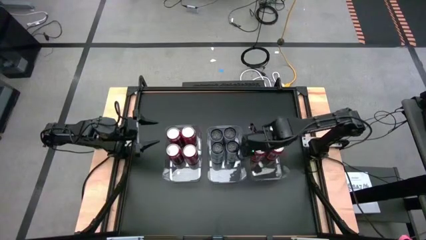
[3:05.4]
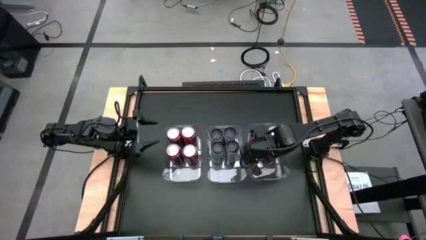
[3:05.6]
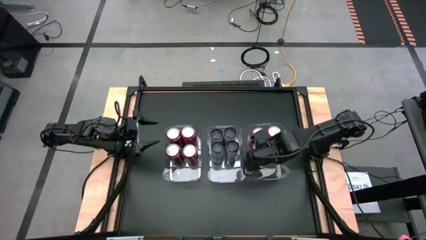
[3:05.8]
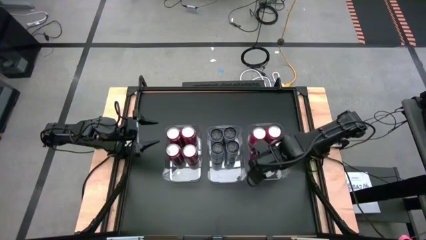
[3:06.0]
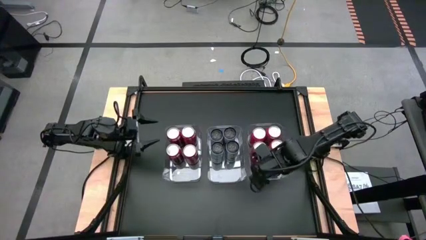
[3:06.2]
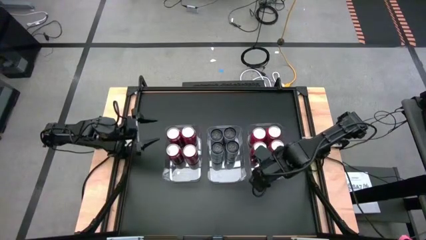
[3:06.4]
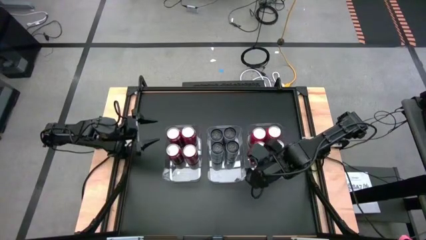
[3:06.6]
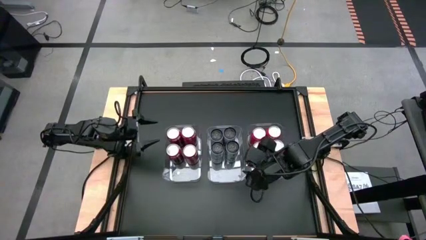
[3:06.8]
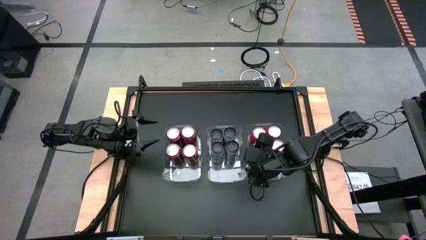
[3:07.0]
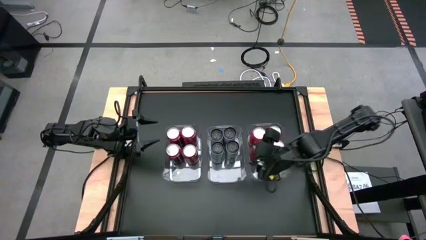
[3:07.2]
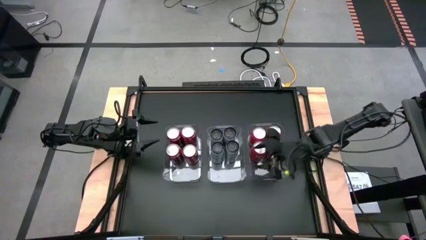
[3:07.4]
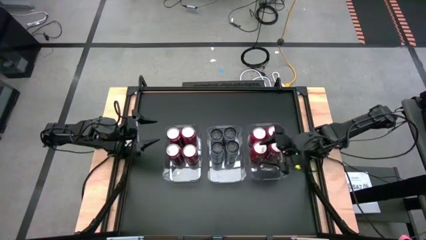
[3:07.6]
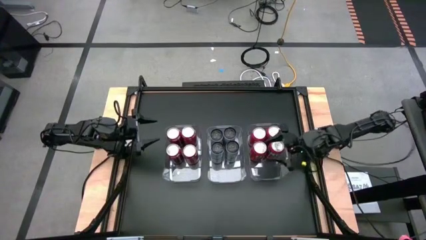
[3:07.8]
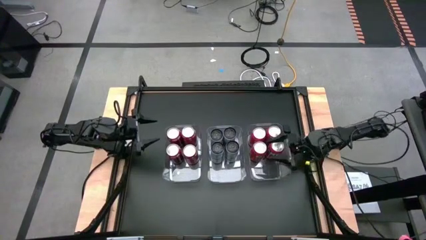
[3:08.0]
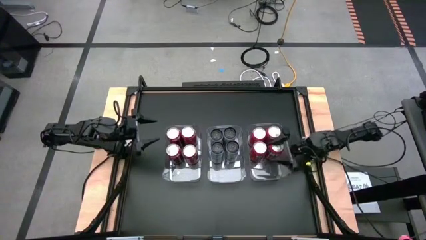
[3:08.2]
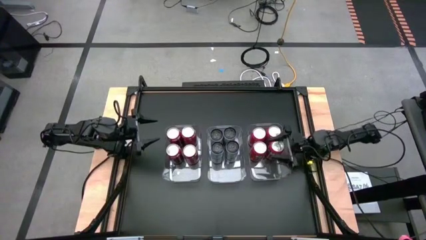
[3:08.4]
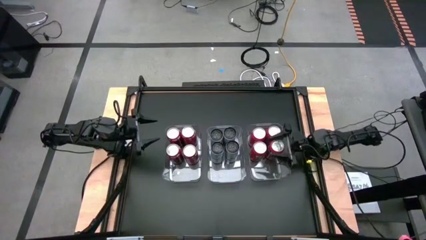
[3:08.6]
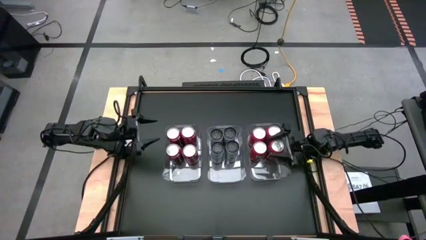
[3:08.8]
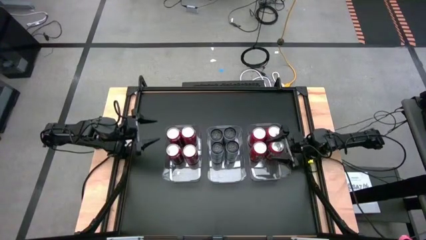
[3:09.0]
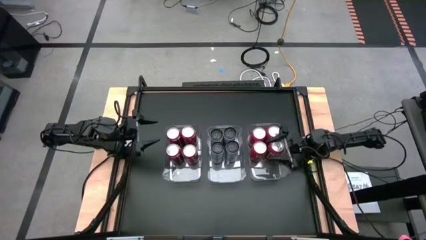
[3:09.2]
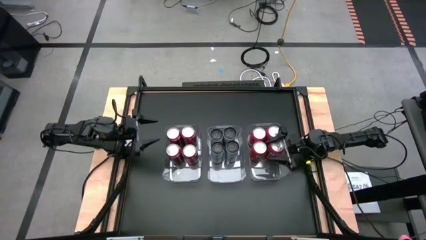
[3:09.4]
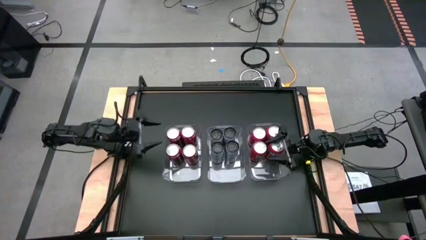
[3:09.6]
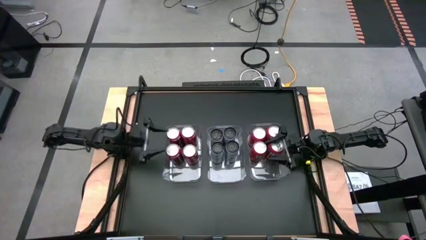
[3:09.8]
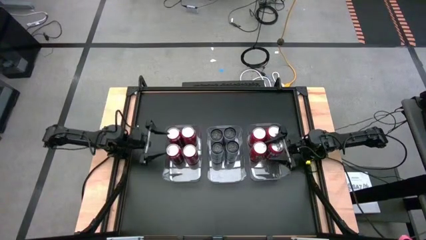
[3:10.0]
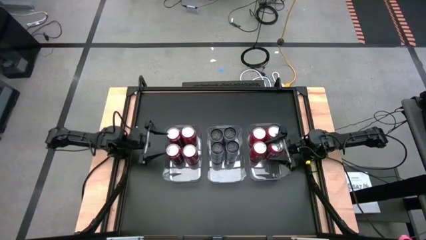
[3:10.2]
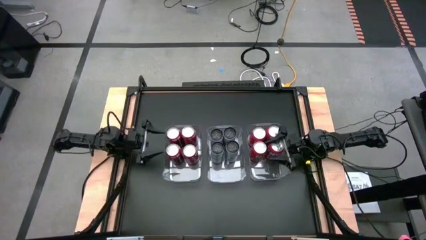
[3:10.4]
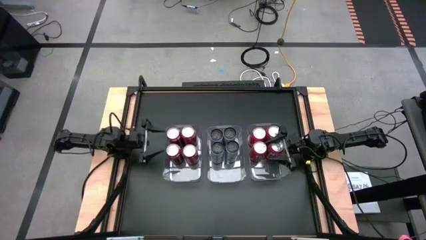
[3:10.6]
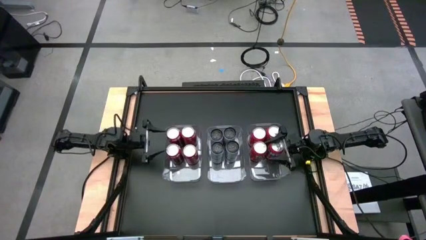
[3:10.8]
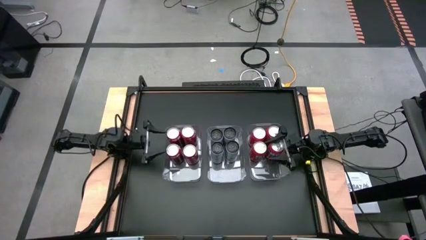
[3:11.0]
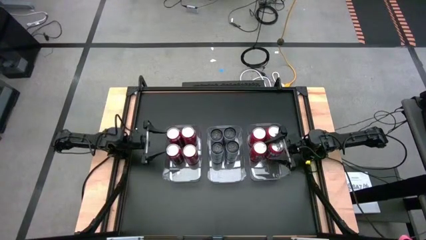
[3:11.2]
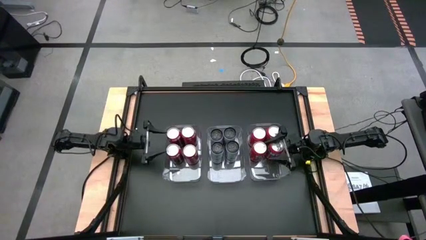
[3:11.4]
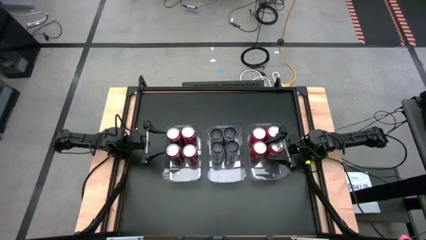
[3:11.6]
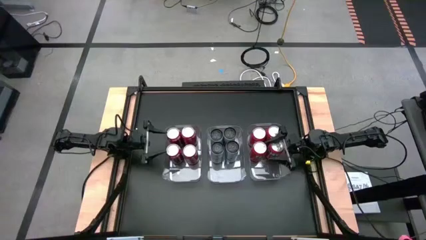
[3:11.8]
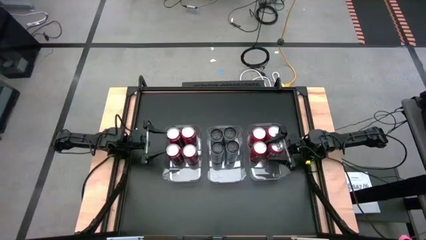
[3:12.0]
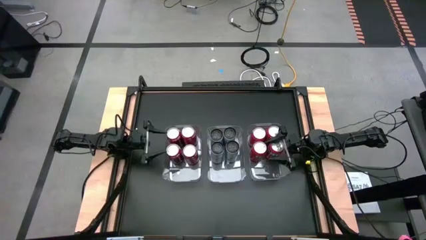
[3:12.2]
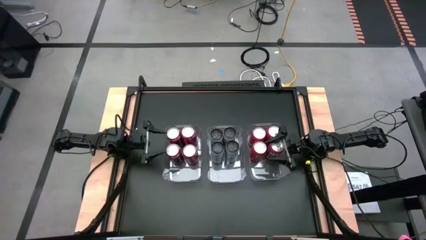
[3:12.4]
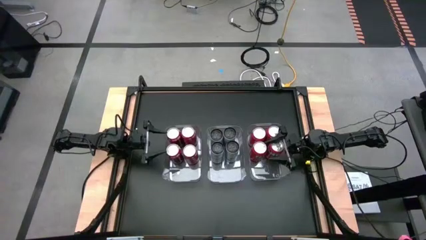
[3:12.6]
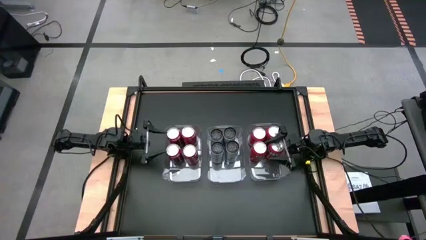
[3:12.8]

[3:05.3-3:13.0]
Task: Sort soda cans
Return to Home Position

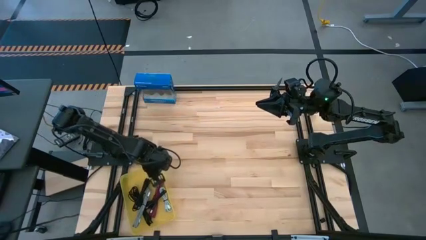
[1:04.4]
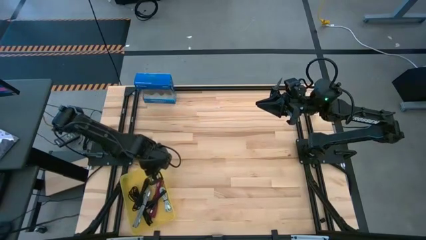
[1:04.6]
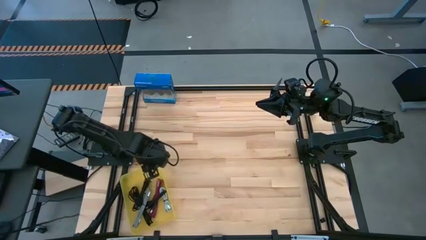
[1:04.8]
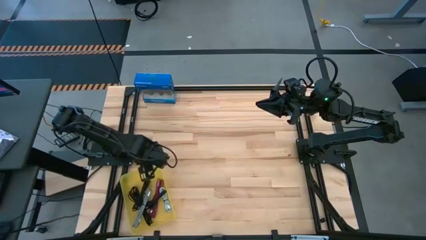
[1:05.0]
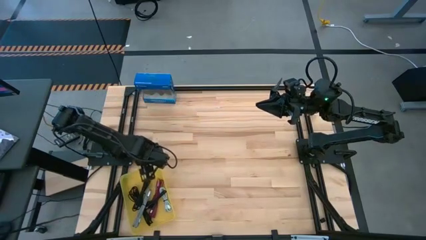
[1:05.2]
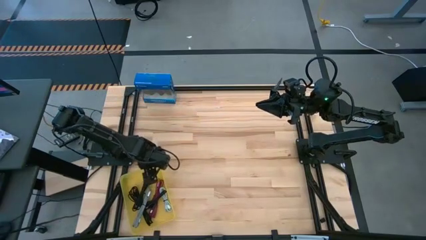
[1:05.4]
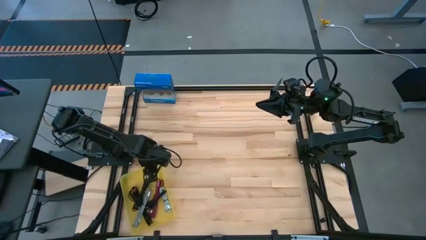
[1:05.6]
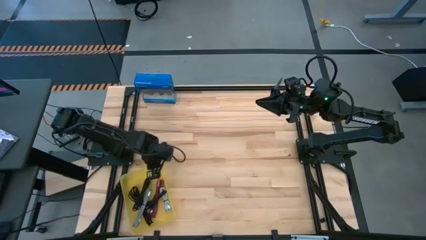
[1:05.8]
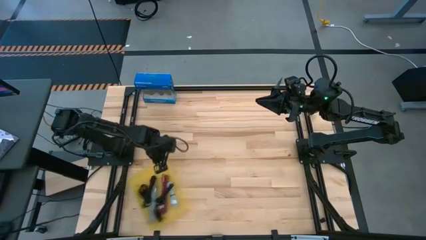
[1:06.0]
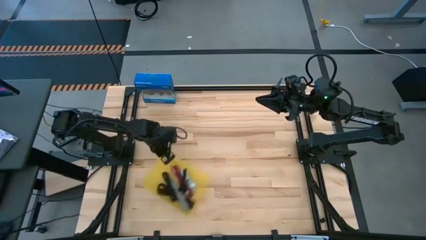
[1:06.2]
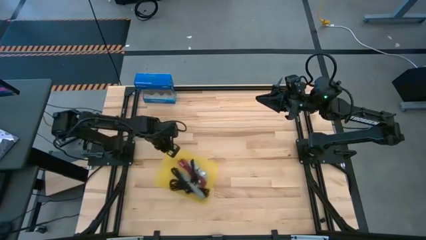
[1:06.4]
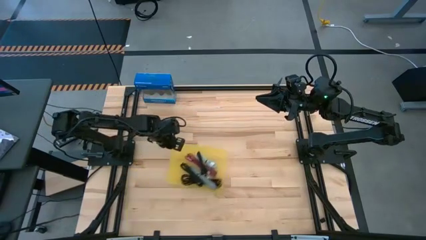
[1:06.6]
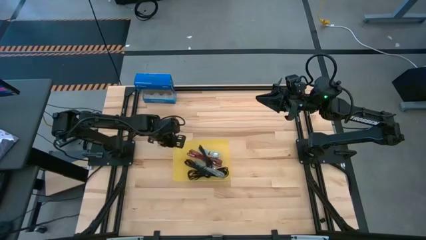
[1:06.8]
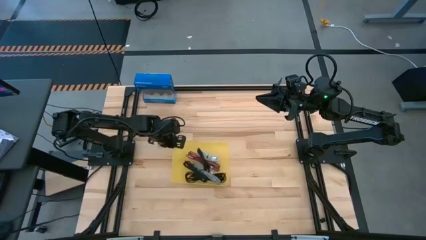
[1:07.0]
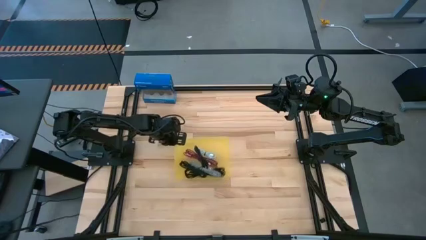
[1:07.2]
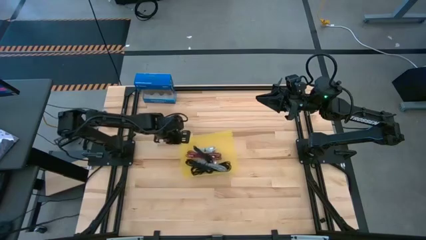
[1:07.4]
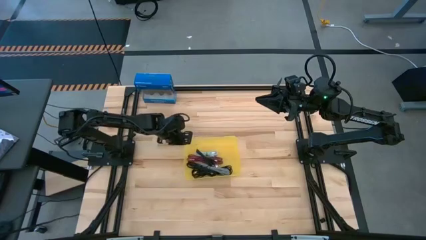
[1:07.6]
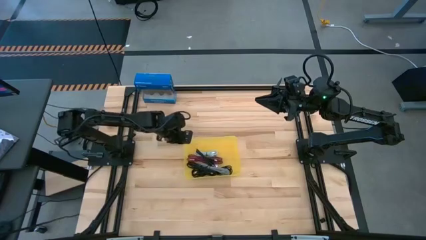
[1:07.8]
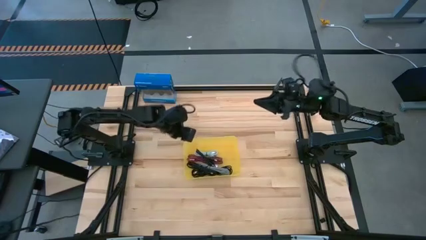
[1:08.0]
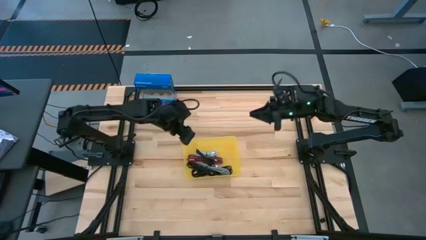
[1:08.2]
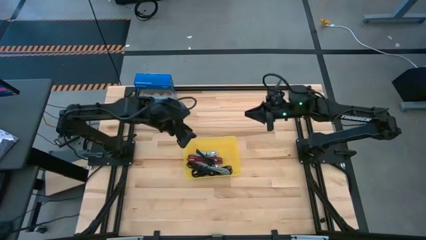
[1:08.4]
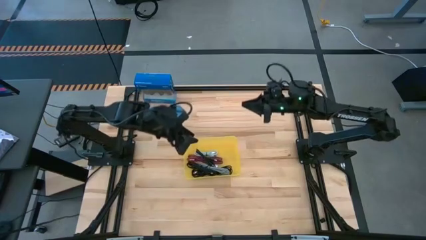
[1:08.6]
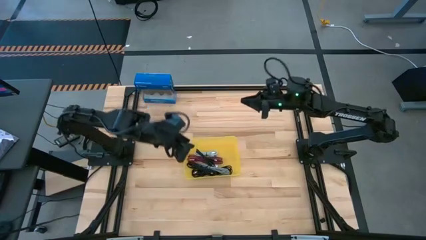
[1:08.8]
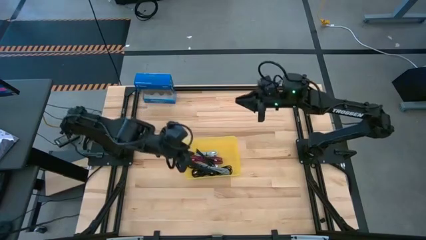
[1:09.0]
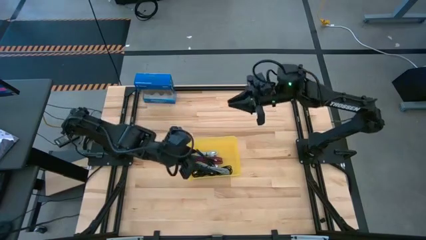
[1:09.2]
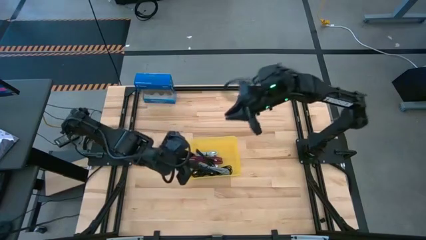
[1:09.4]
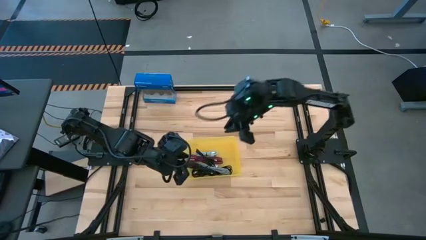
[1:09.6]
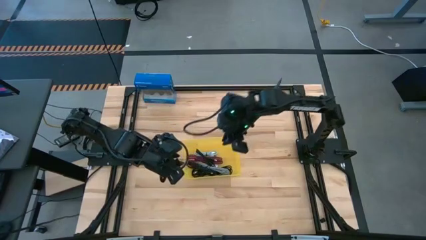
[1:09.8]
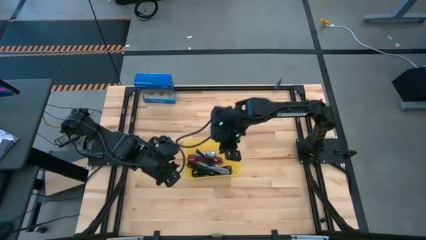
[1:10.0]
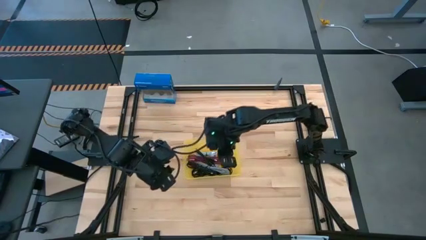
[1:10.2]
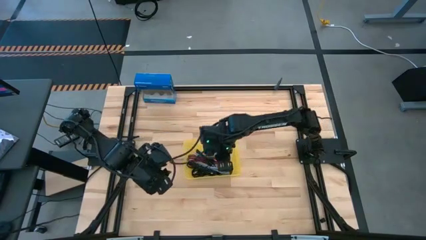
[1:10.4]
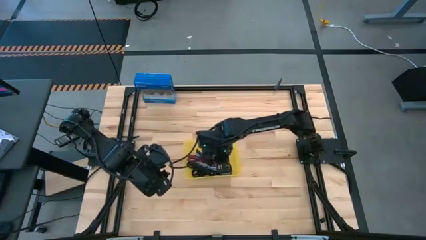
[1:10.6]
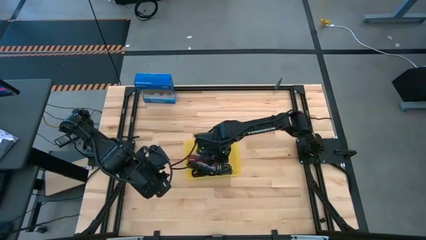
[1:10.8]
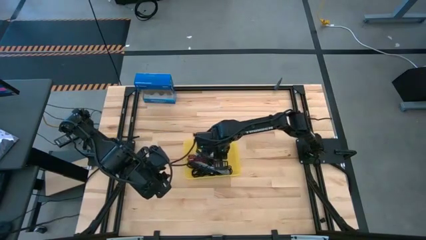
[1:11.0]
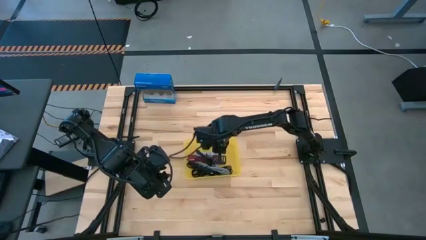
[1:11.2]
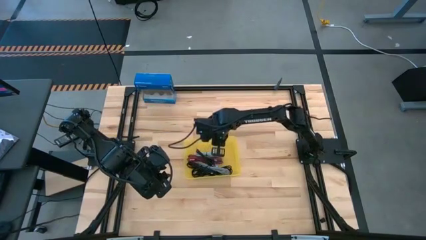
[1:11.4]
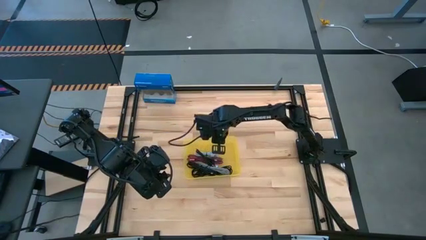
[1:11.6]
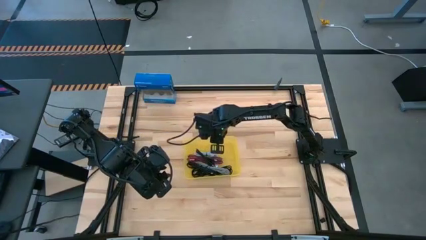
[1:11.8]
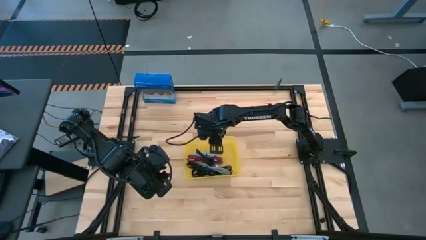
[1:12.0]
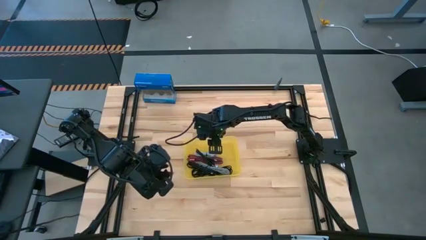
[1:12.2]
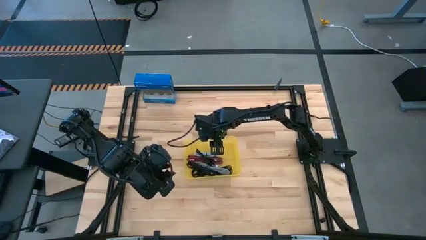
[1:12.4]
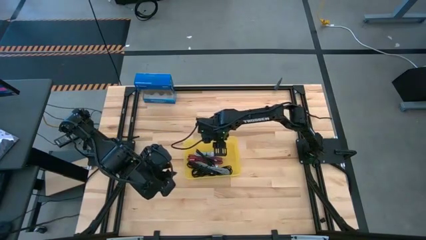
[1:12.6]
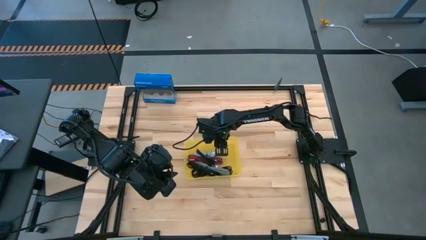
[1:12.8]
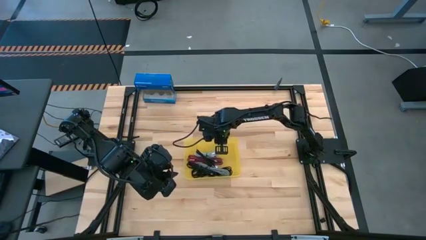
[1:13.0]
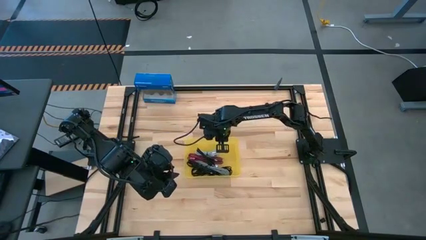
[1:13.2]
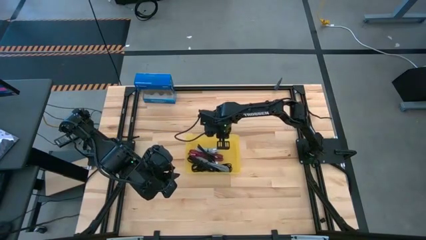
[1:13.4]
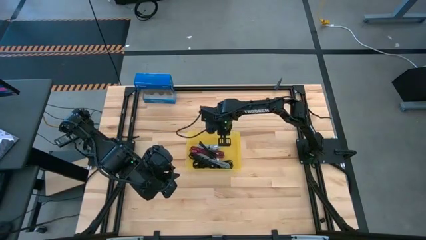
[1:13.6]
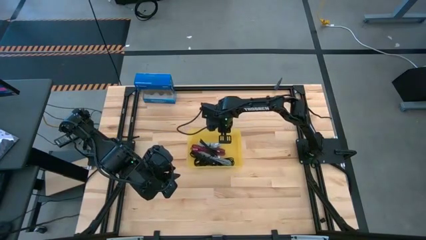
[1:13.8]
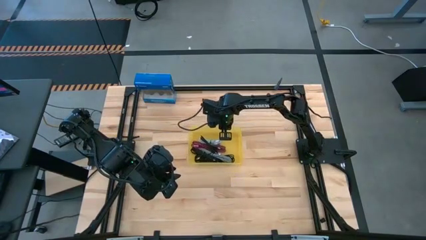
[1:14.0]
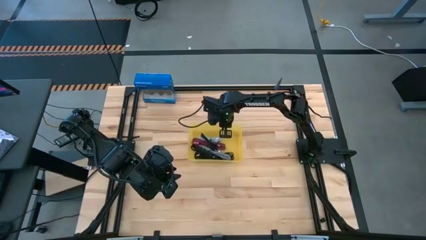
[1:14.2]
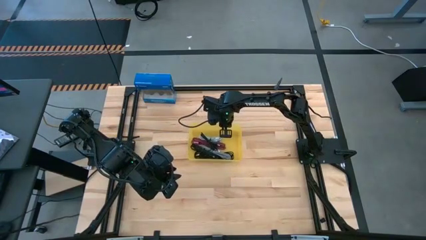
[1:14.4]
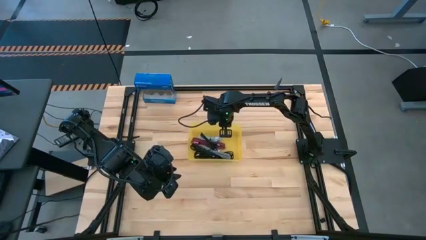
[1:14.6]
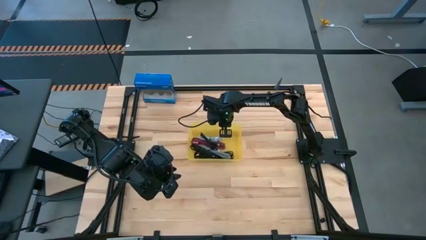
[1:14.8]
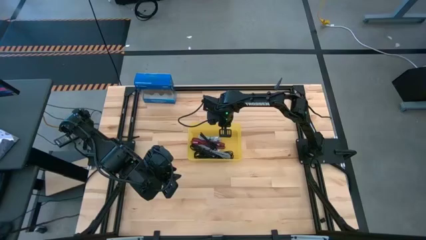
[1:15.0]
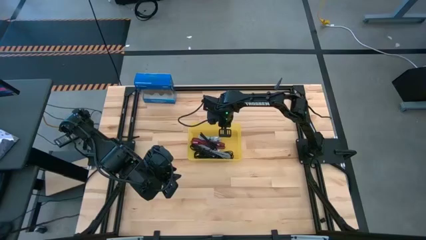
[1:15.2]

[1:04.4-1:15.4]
Task: Pick and place USB-C Cables
Move the yellow bin to the center of the table
